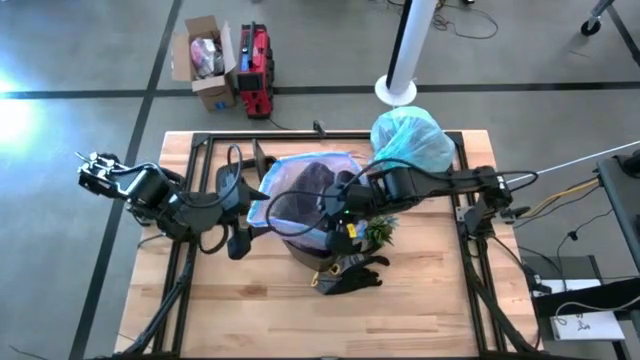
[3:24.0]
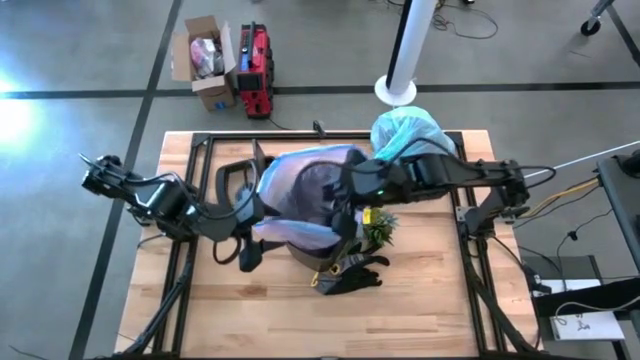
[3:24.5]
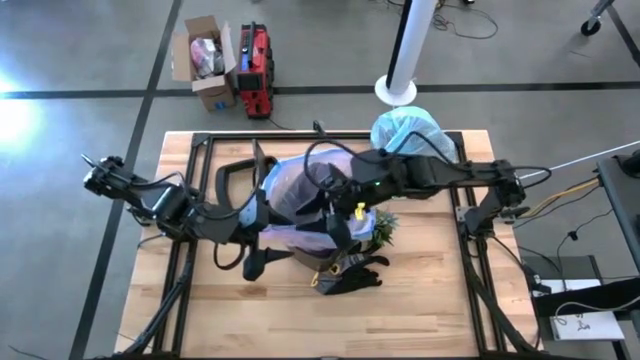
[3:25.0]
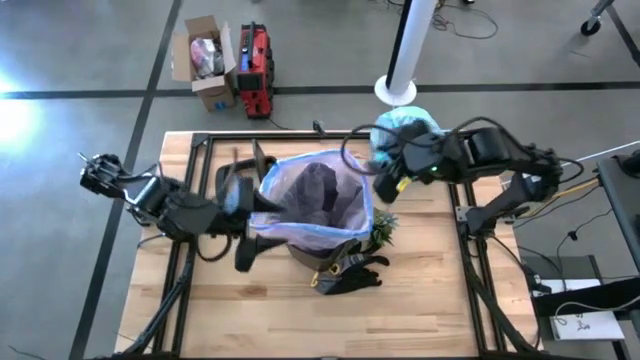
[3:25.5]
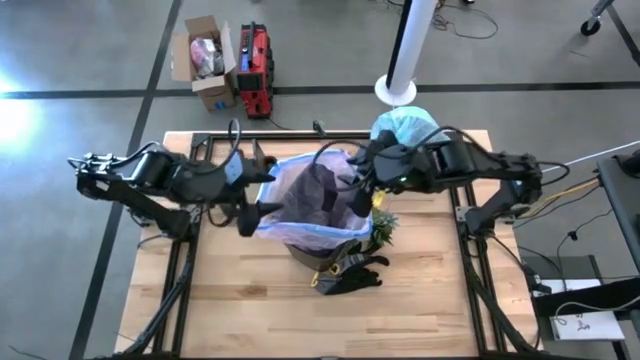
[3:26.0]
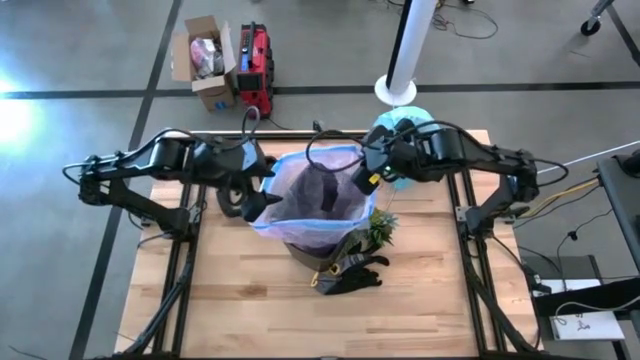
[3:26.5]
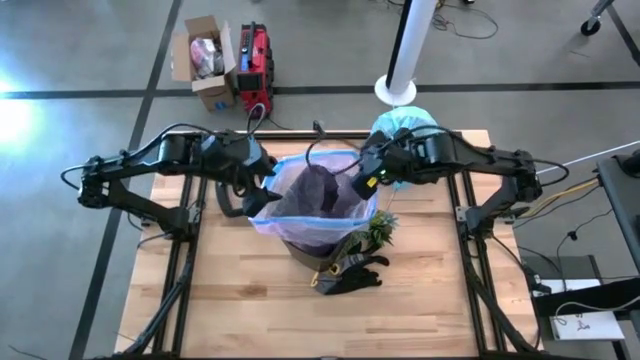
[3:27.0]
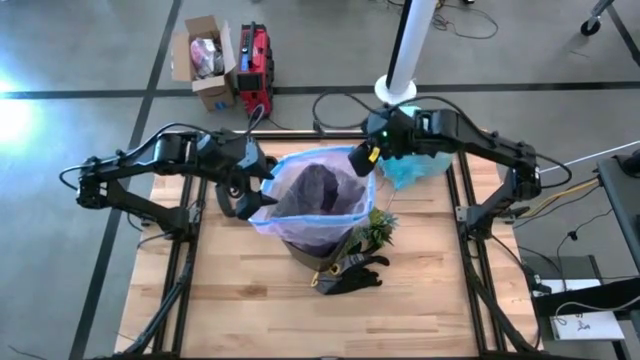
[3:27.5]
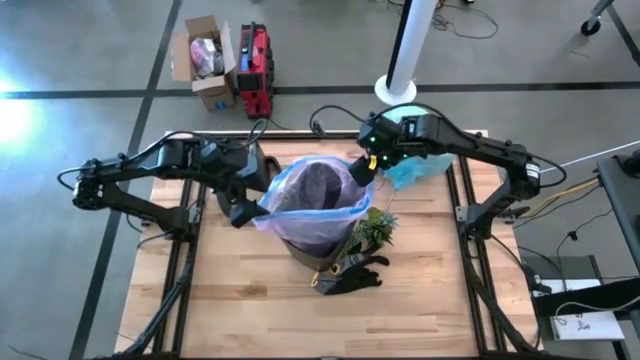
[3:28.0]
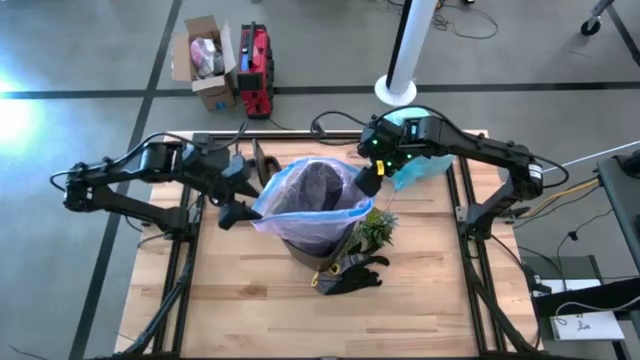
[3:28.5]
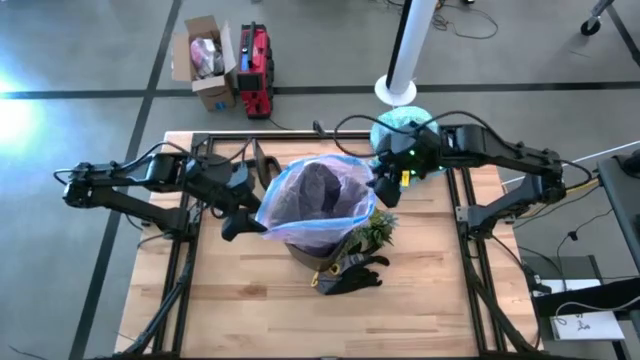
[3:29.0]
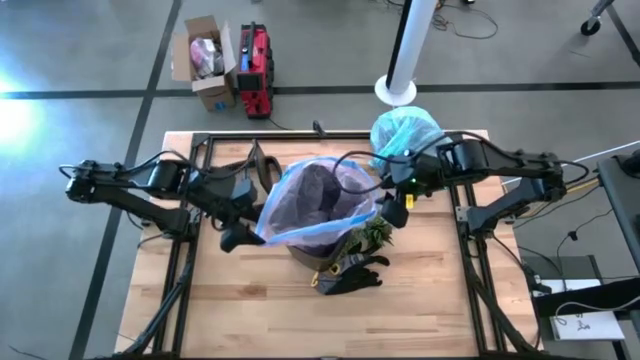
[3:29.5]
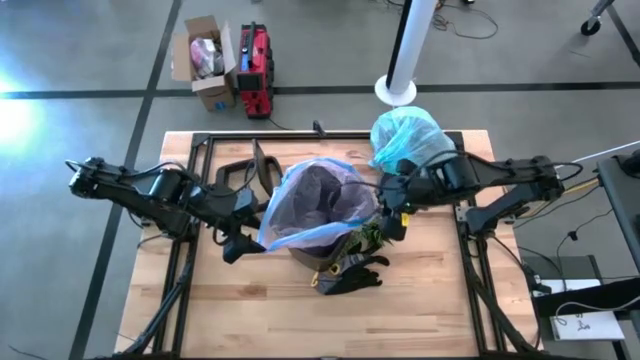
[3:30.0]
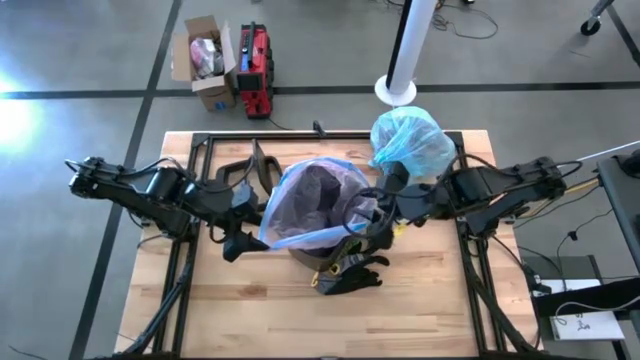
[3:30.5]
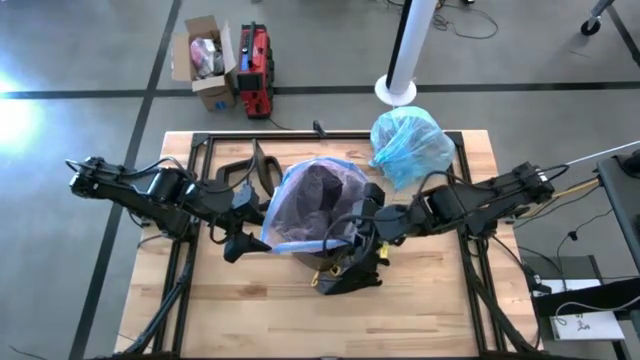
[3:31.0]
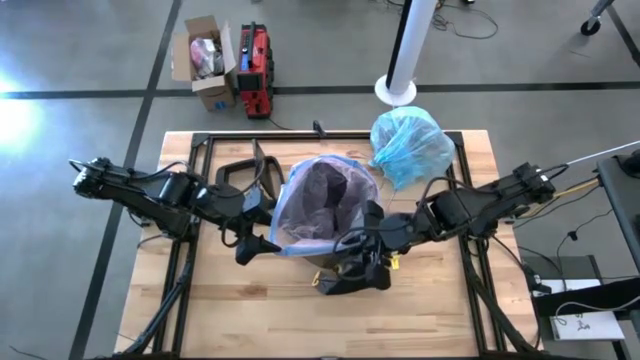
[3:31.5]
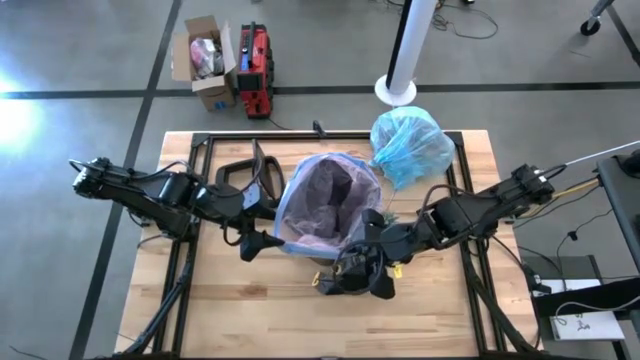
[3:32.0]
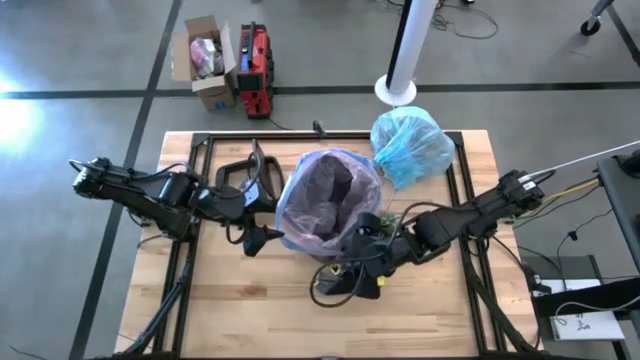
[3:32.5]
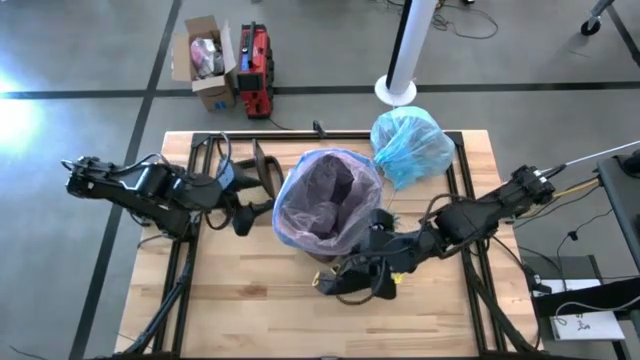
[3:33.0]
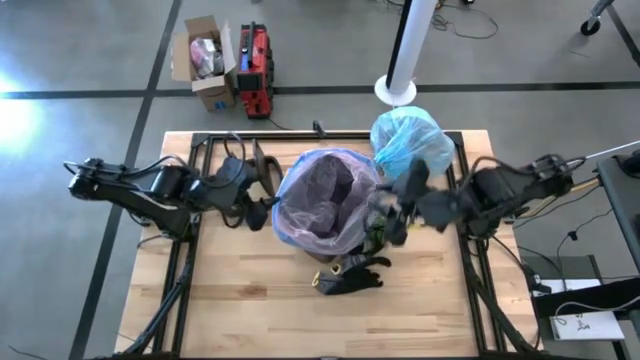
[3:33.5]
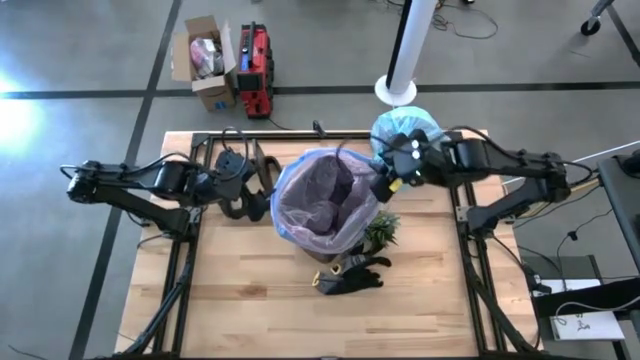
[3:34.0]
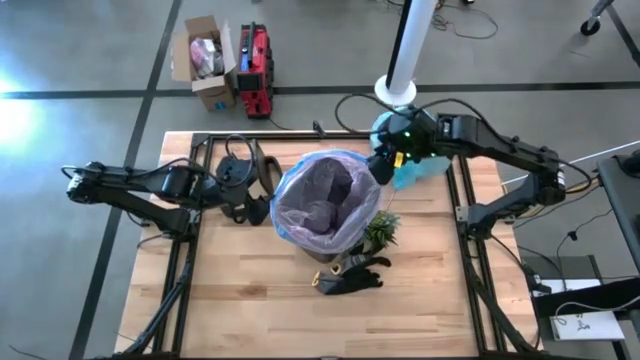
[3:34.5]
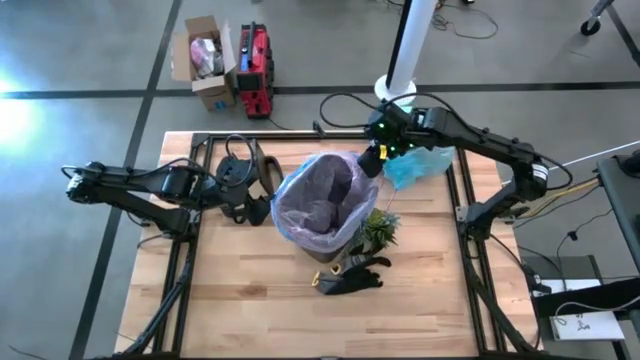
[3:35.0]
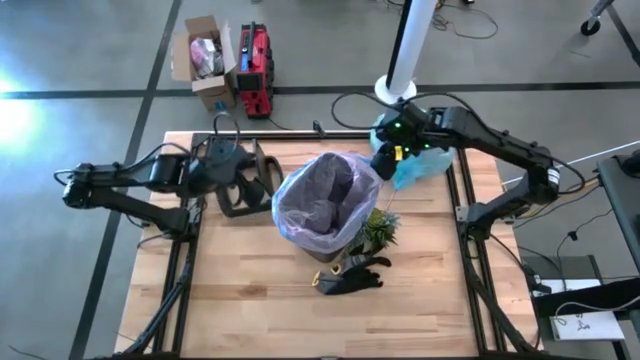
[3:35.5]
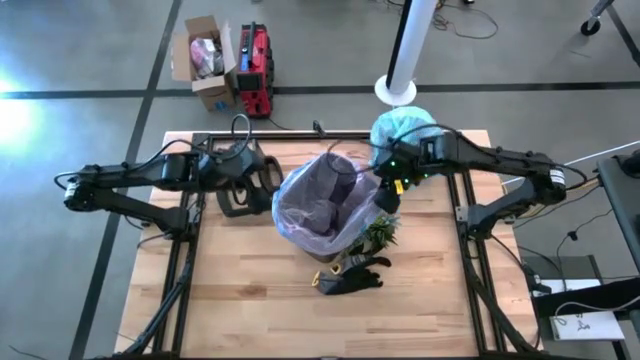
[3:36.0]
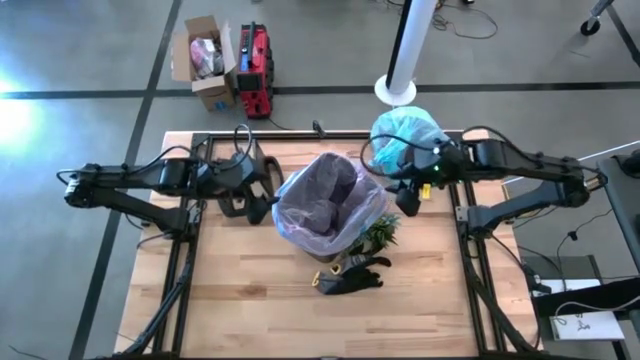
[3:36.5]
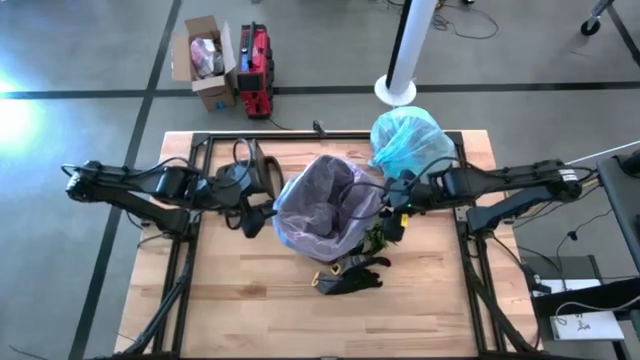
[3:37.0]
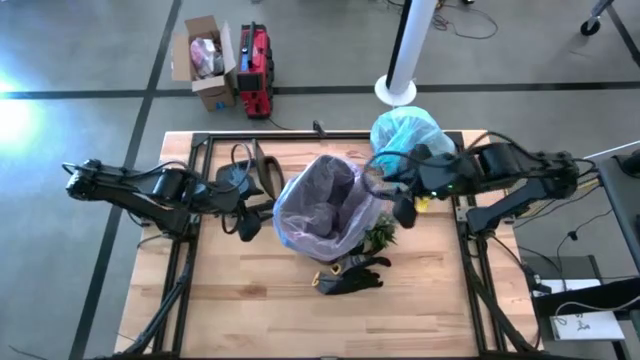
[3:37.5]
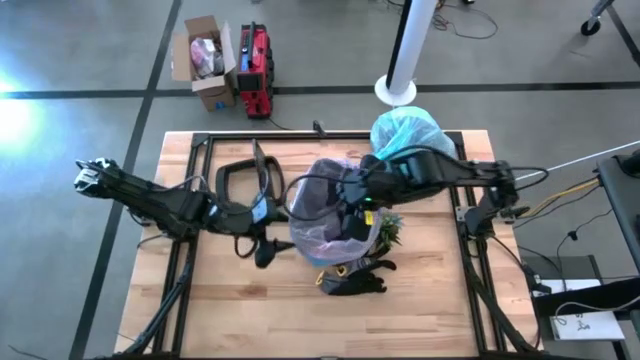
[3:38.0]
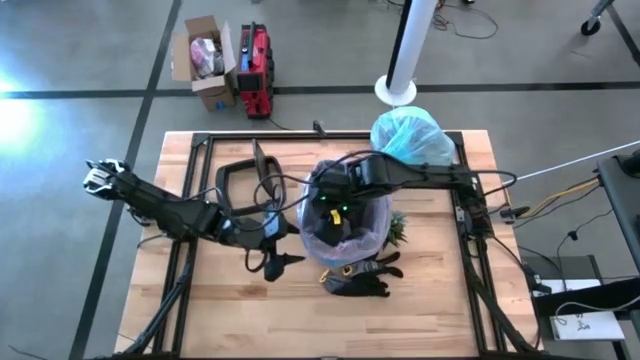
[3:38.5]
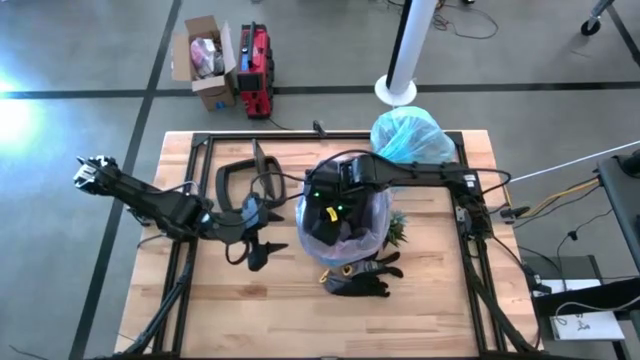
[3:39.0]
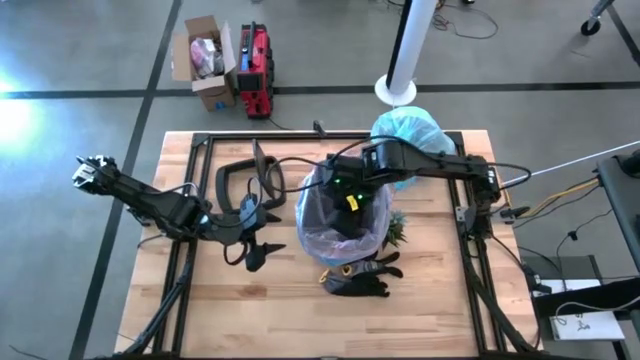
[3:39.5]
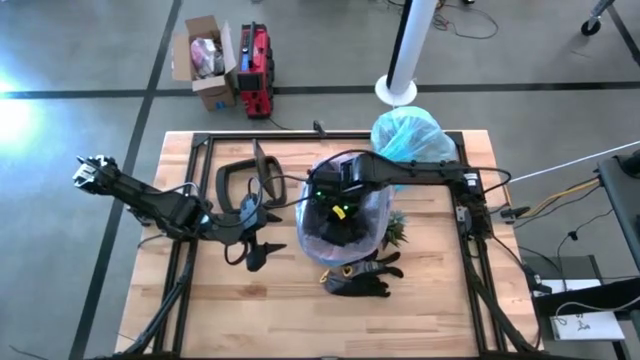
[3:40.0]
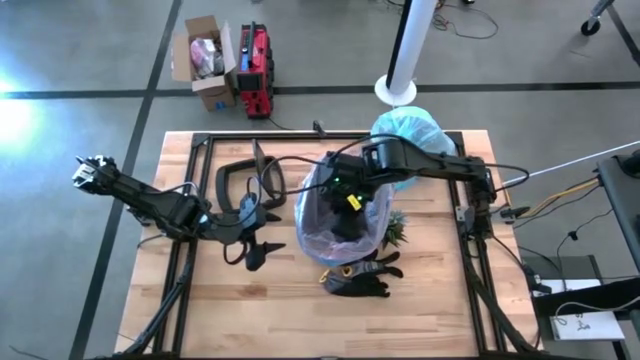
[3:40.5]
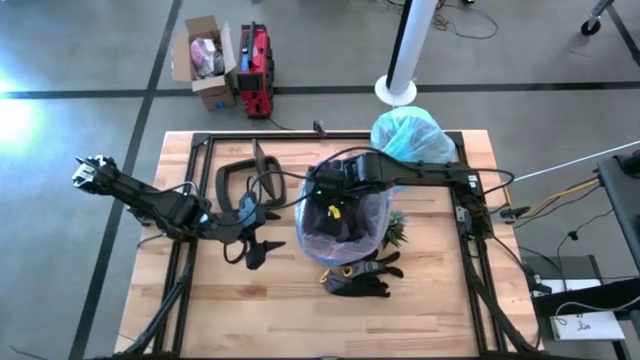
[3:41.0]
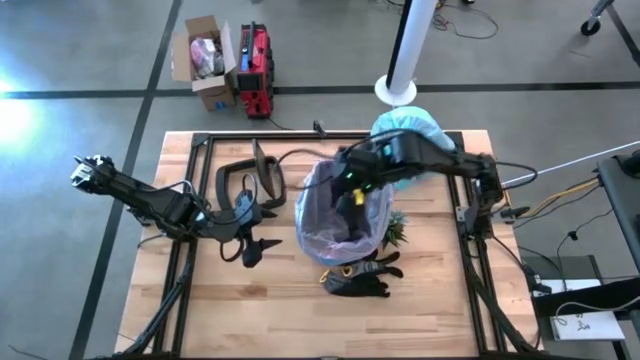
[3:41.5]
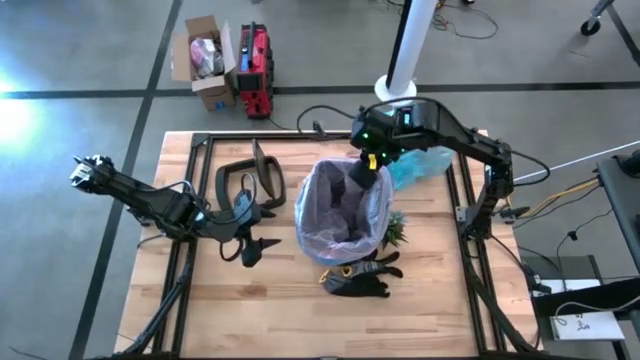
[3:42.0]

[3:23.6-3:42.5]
Task: place trash/remove bag and relplace
Insert the trash bag into the trash bin

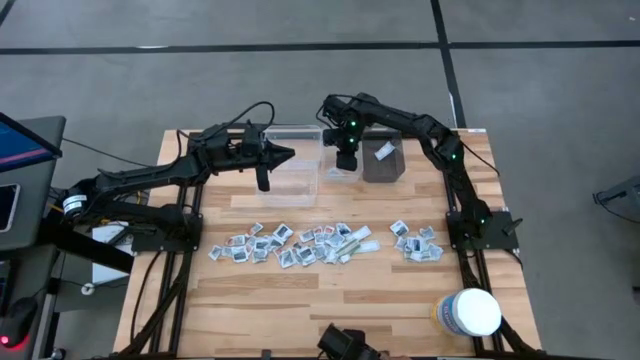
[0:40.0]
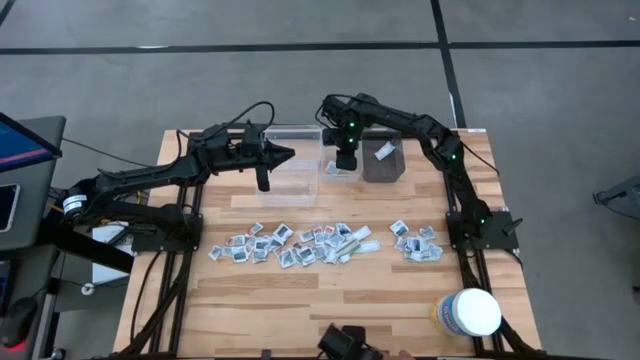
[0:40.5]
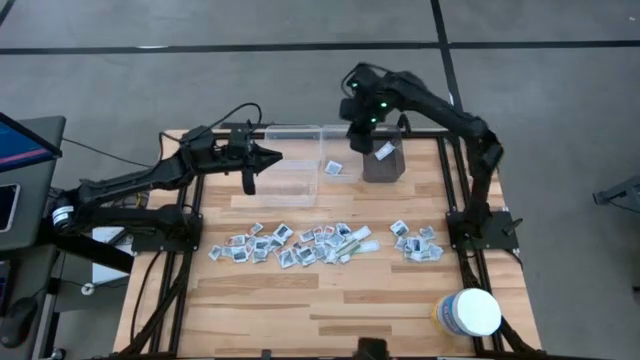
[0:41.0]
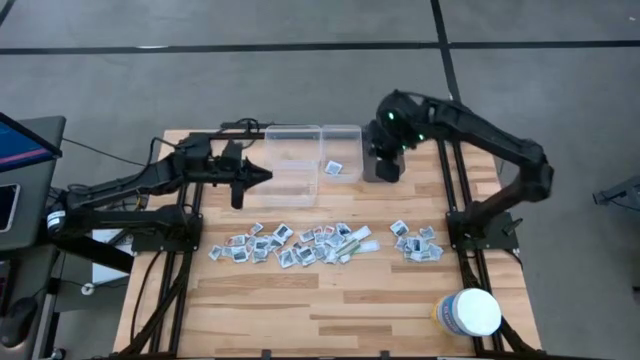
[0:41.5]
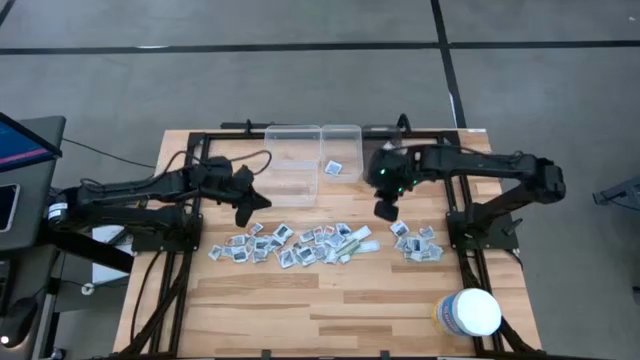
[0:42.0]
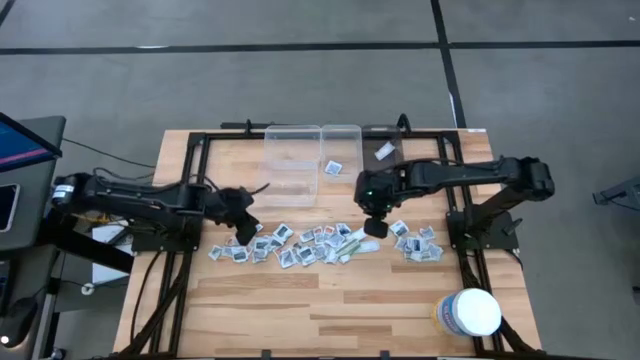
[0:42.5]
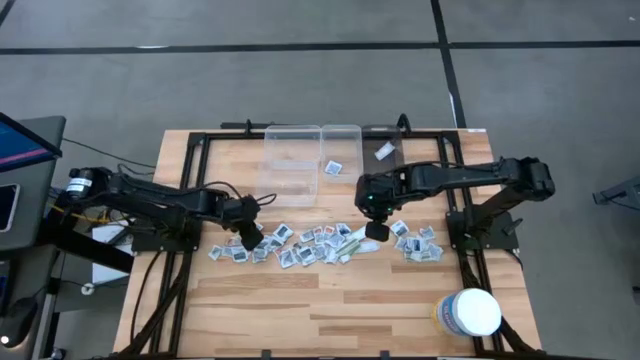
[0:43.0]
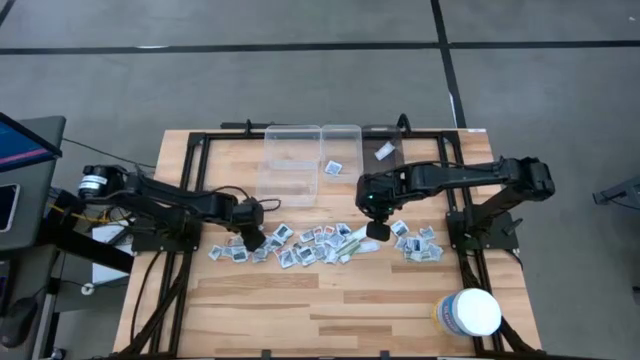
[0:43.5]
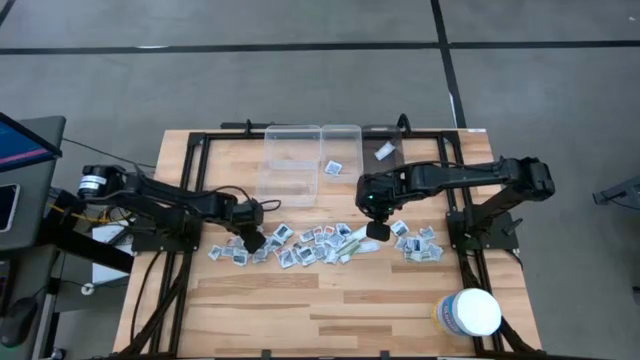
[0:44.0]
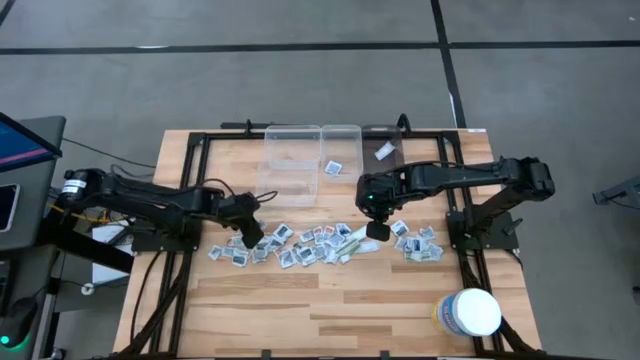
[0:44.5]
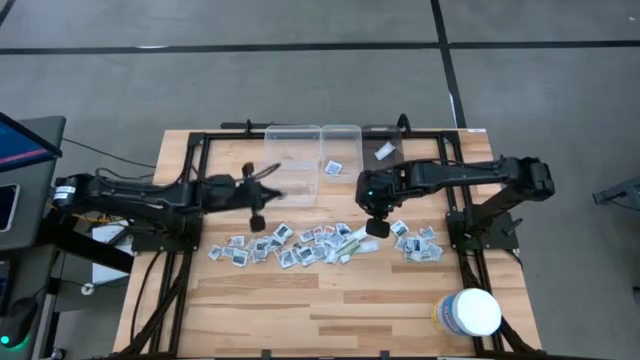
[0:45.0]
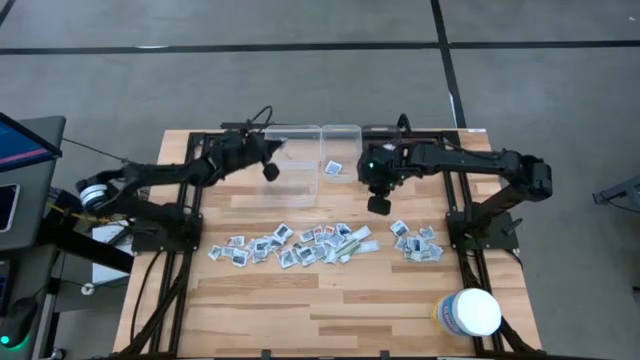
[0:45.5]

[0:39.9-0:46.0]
Task: Pick & Place First Aid Supplies
Put the ointment pack into the top left transparent bin
